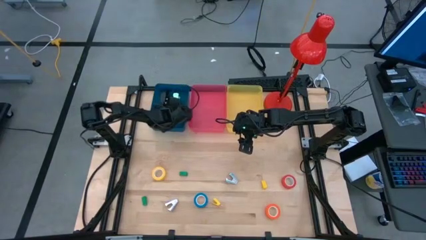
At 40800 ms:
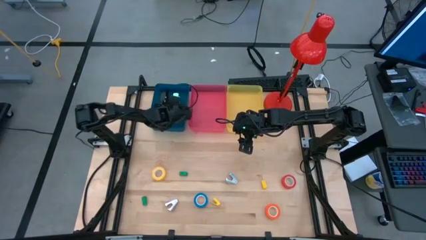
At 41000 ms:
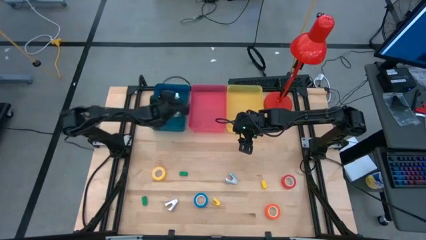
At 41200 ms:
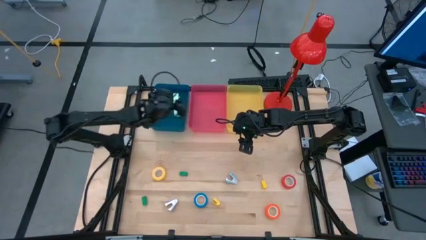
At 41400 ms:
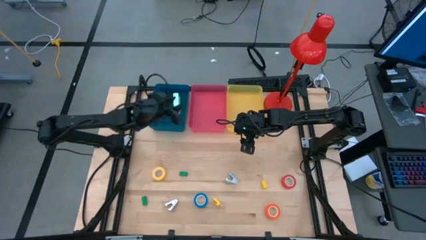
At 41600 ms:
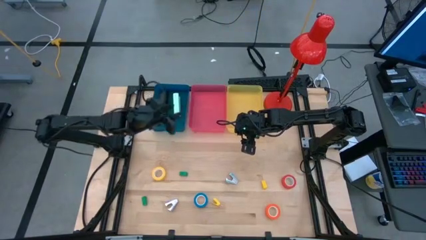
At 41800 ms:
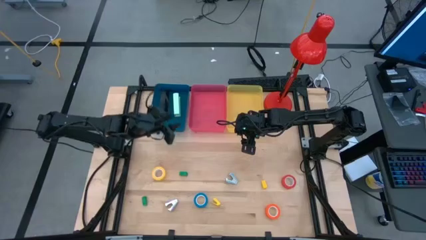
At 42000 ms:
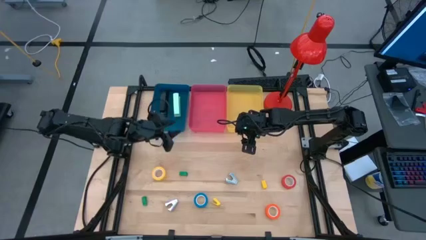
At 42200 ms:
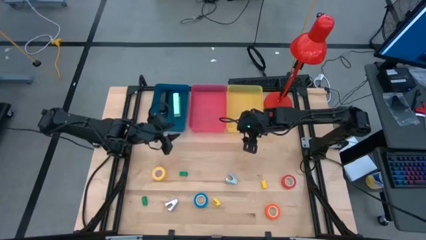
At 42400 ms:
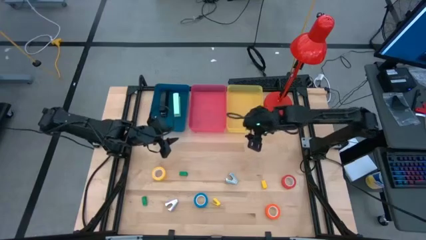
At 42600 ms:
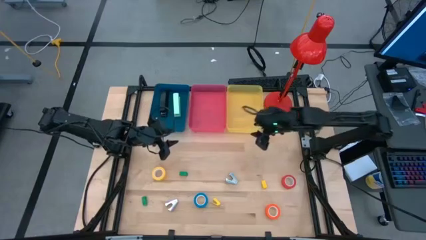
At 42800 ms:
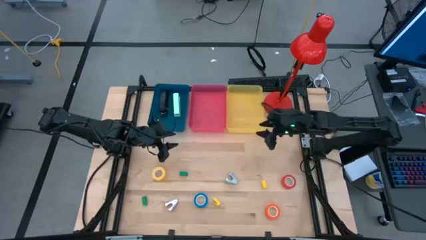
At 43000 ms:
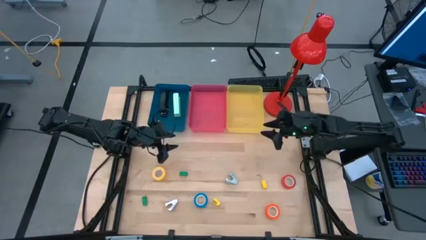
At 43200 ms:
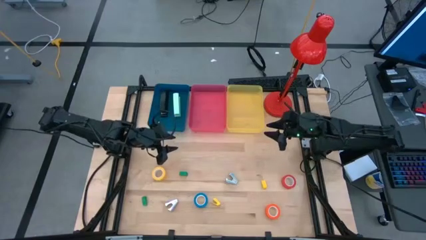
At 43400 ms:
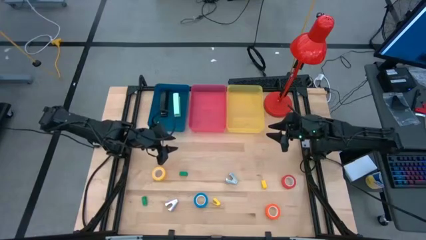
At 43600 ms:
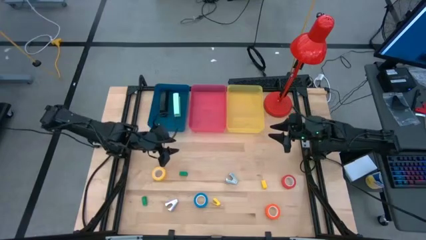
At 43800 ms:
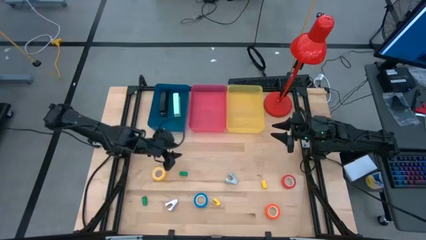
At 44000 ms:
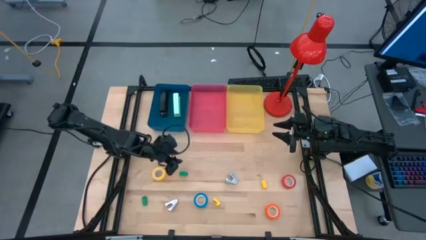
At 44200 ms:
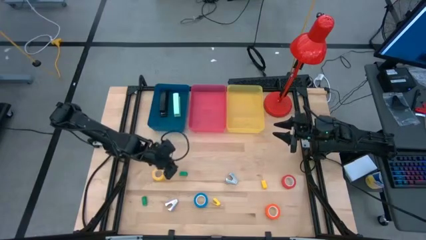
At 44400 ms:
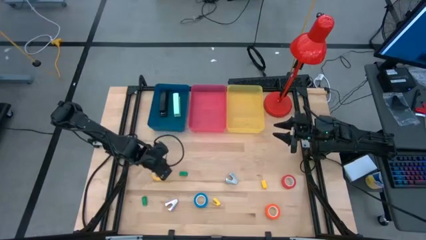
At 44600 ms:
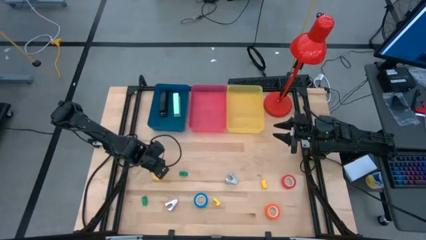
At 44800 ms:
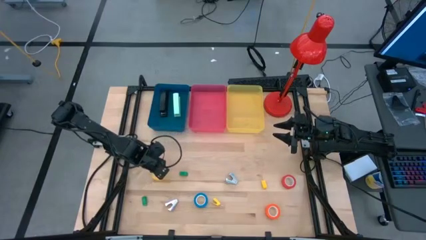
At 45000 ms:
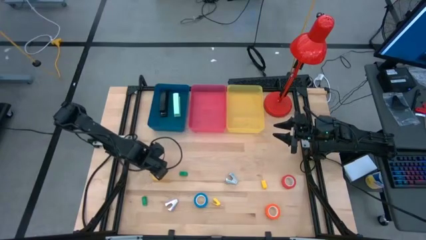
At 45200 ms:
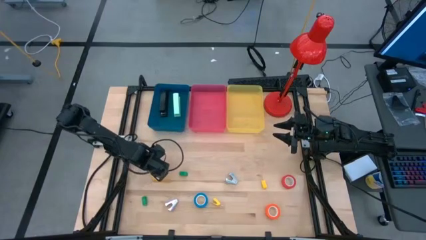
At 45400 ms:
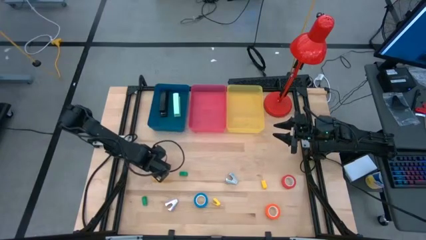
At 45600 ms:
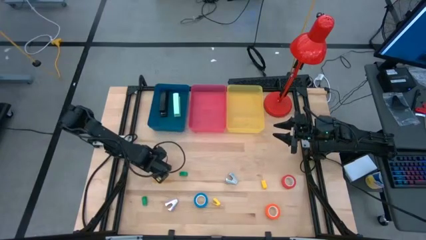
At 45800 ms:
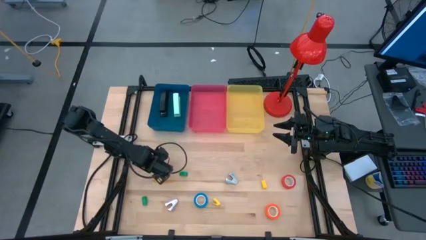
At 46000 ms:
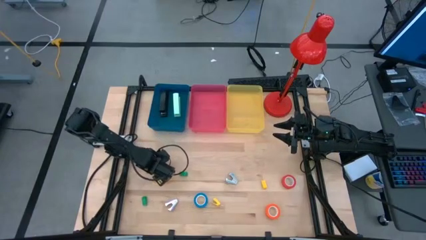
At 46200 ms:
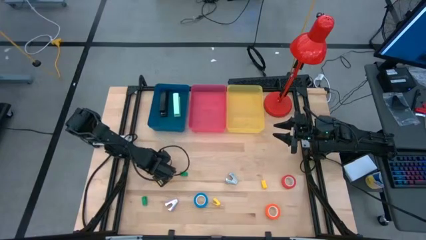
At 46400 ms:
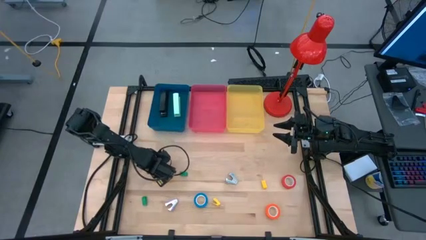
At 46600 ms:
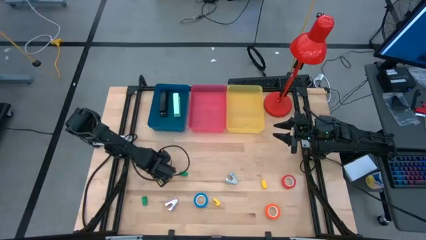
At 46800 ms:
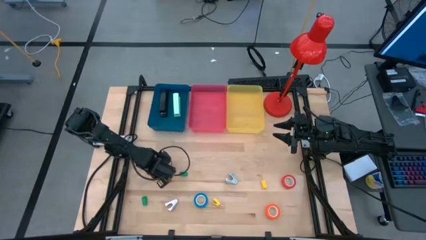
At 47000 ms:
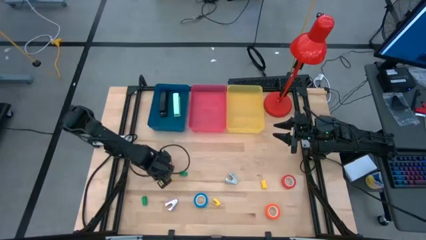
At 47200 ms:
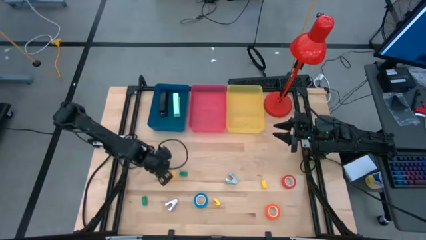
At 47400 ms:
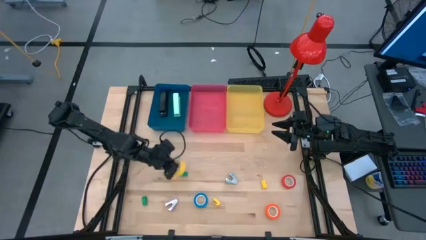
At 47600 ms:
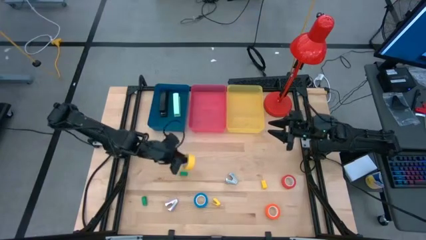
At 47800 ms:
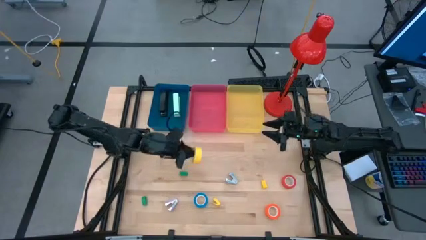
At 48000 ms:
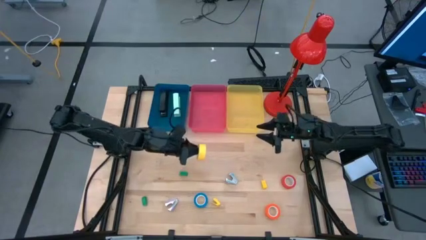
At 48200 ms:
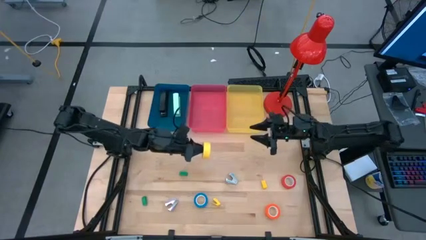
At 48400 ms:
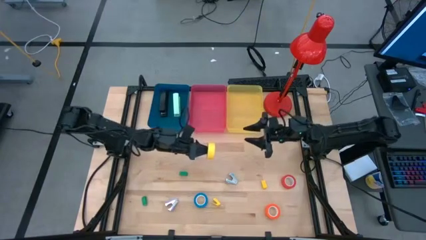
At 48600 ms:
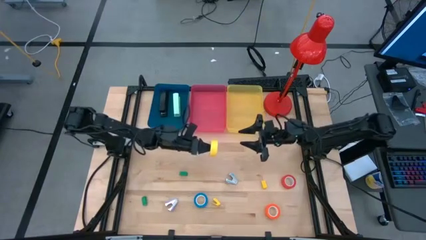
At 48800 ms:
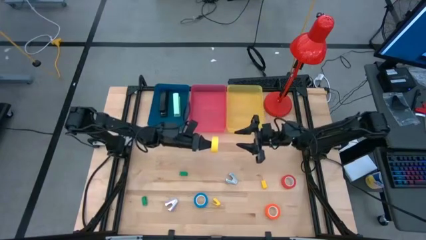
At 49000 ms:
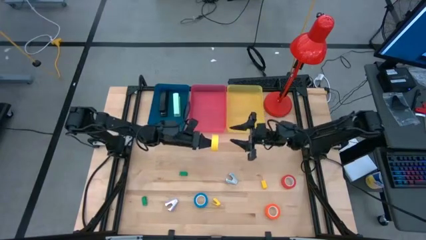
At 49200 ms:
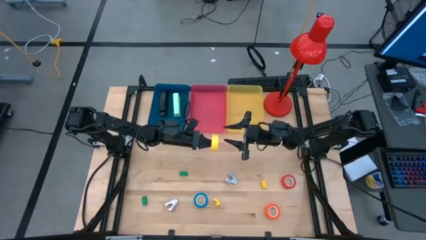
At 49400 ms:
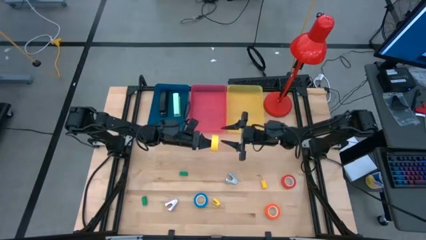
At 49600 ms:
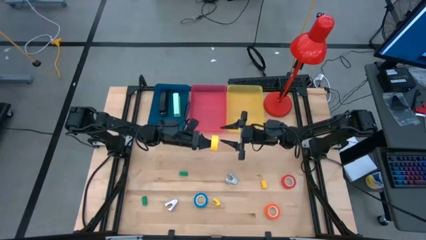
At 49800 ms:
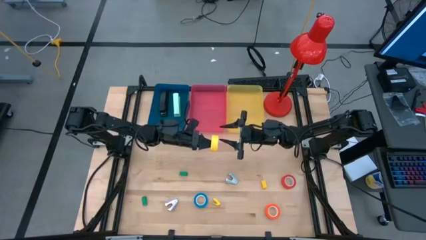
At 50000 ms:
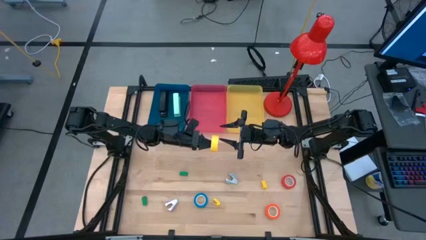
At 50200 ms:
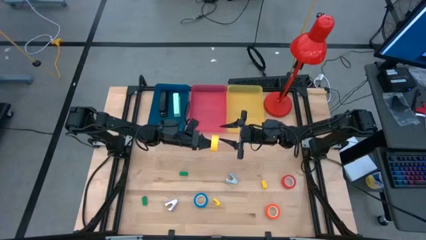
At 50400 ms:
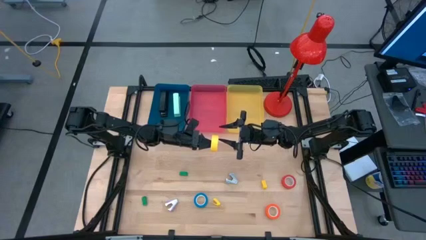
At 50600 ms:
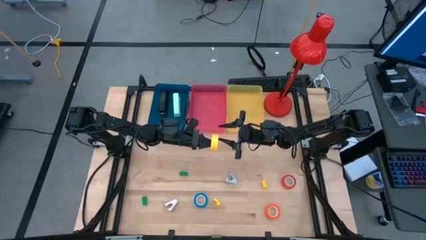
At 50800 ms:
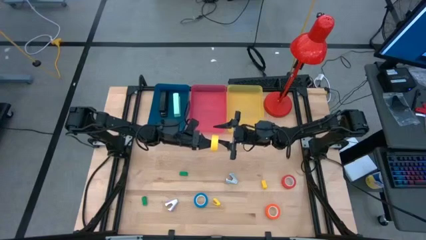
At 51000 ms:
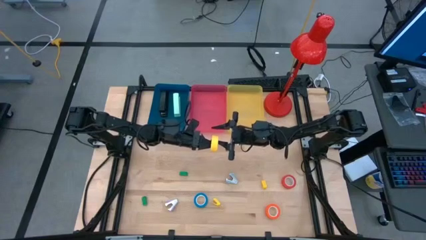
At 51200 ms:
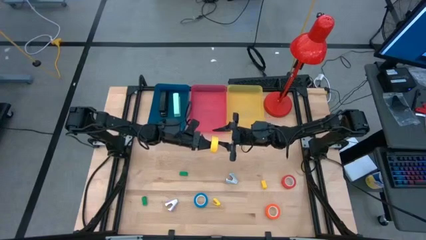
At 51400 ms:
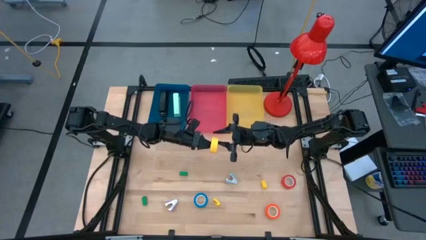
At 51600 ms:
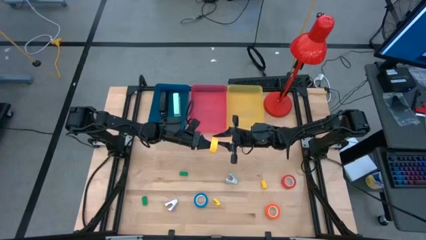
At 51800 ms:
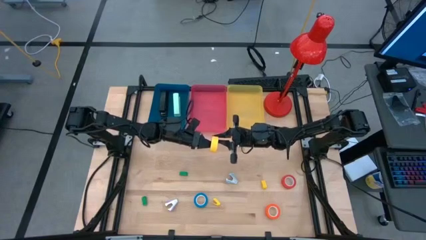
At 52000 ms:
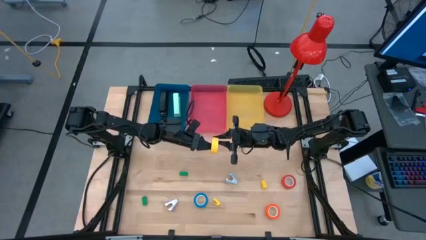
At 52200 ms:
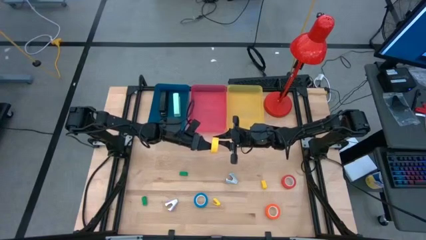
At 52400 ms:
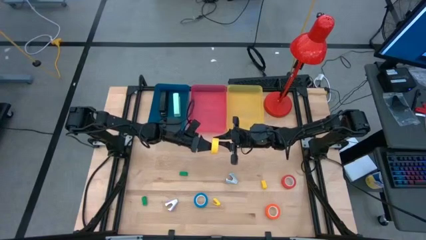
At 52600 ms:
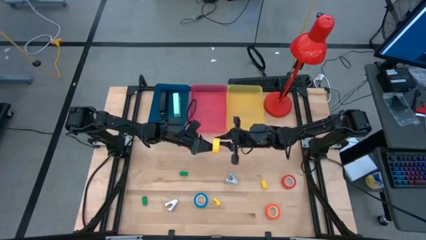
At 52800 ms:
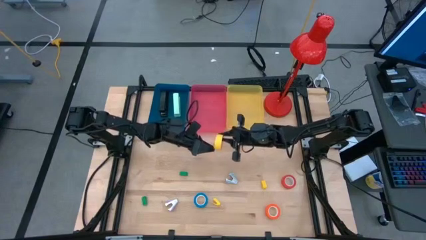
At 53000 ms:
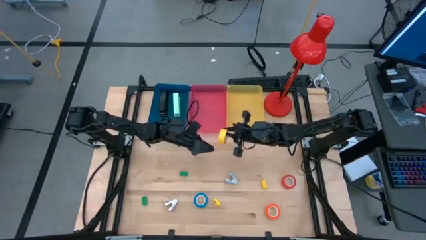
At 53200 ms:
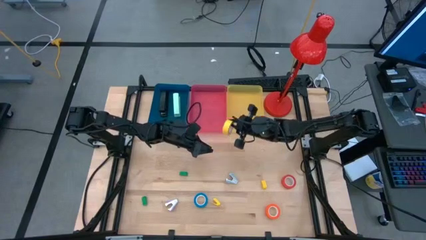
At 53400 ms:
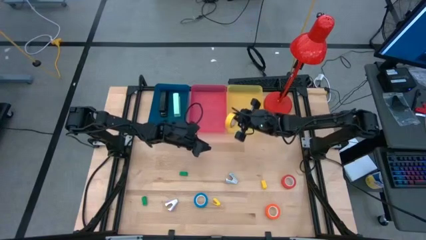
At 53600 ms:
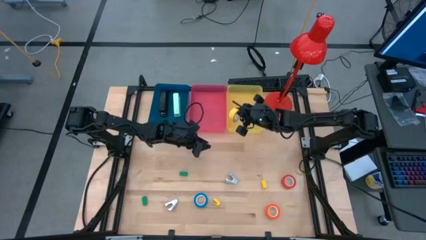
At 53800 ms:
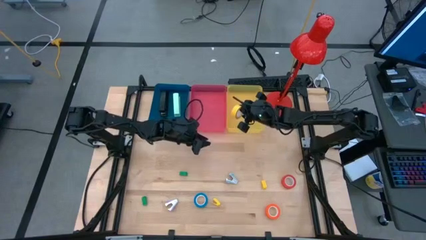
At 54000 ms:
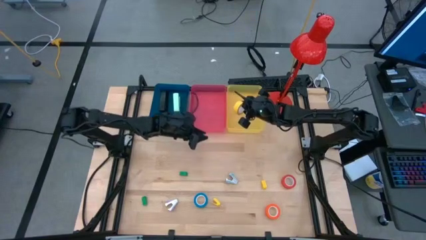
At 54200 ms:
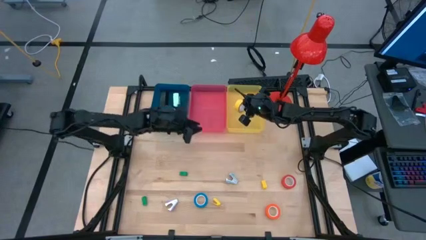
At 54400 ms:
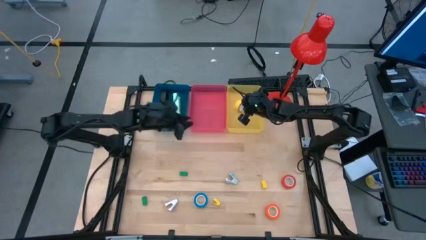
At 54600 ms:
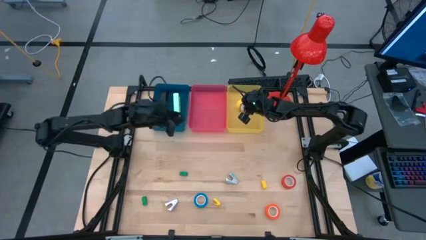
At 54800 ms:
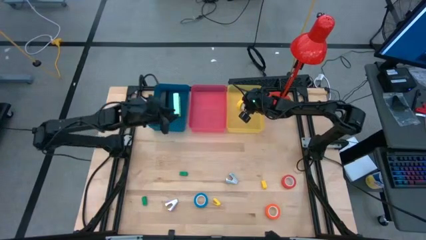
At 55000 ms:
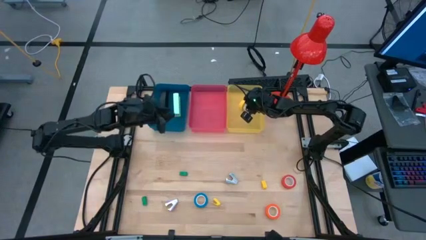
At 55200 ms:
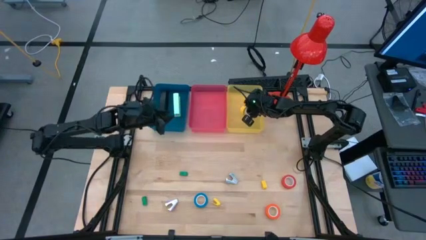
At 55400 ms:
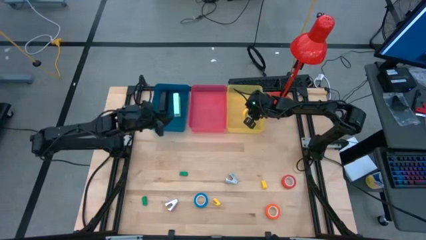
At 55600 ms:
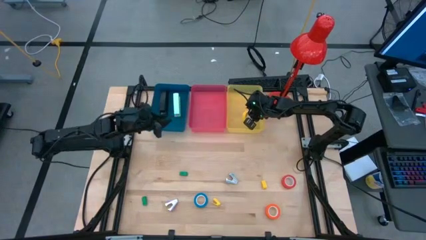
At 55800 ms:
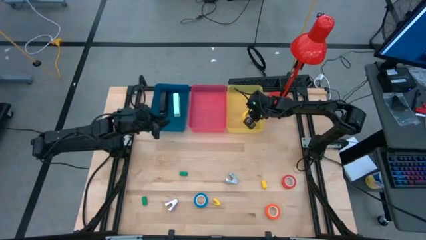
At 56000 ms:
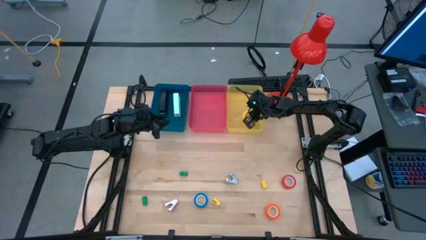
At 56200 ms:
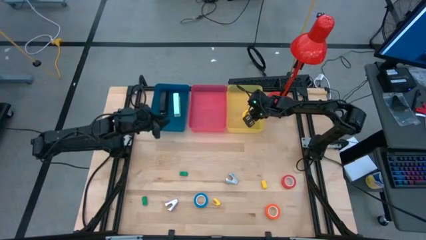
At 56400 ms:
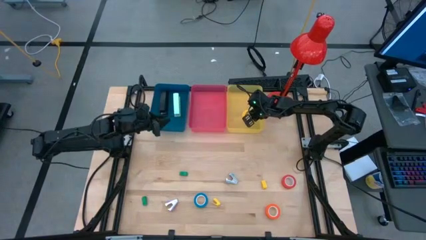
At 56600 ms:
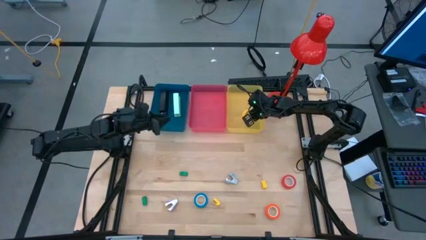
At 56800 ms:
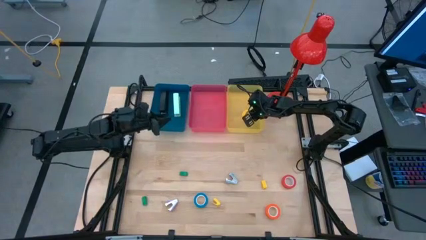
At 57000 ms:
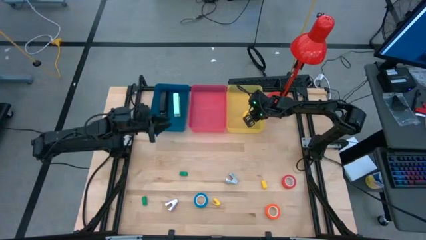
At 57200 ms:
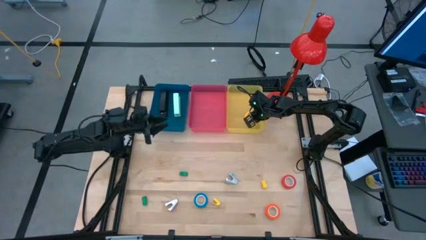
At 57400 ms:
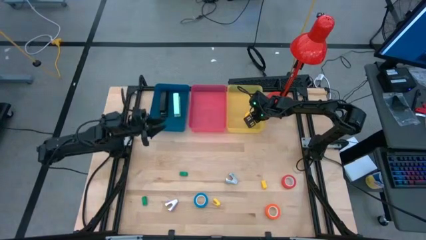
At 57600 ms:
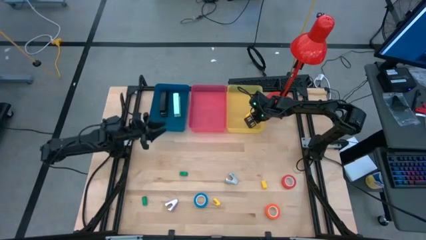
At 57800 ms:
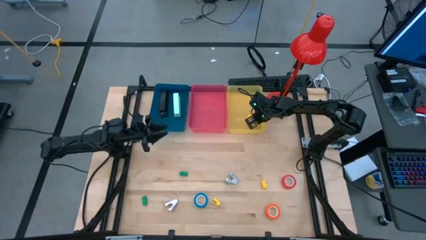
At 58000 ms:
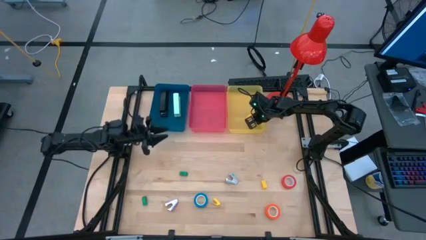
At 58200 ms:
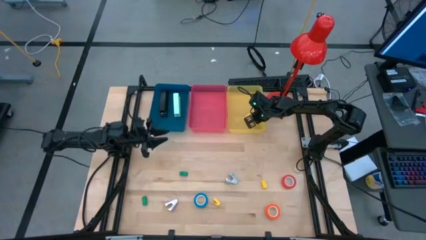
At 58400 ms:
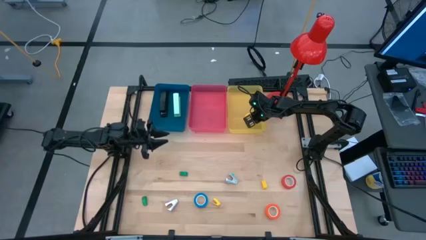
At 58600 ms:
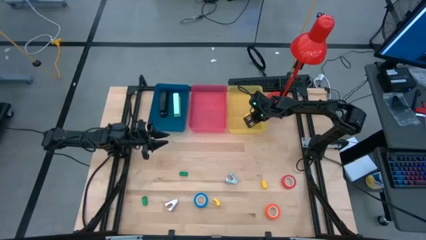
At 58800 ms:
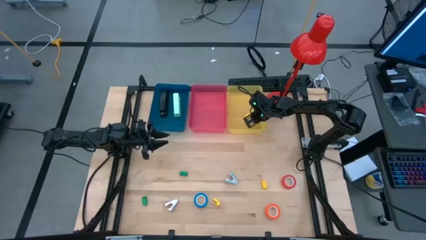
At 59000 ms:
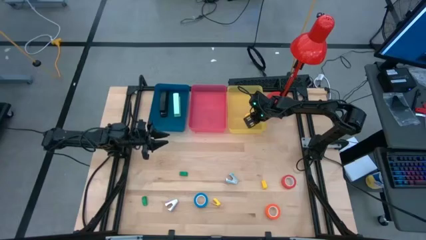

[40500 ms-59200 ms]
Task: Pick and place Stapler, Stapler remover, tape
Put the yellow tape into the yellow bin
